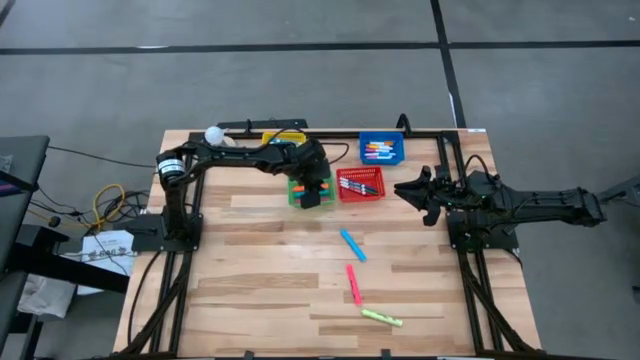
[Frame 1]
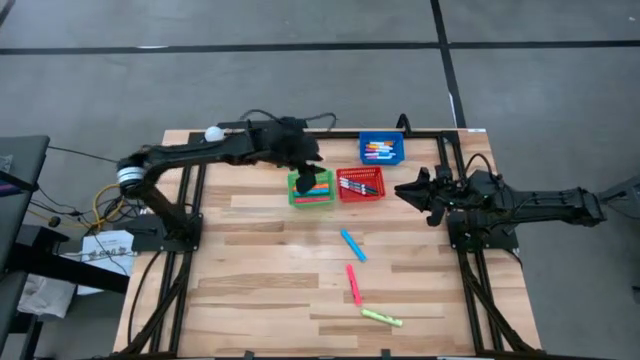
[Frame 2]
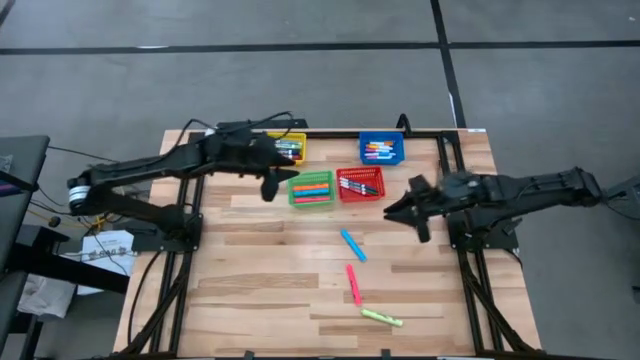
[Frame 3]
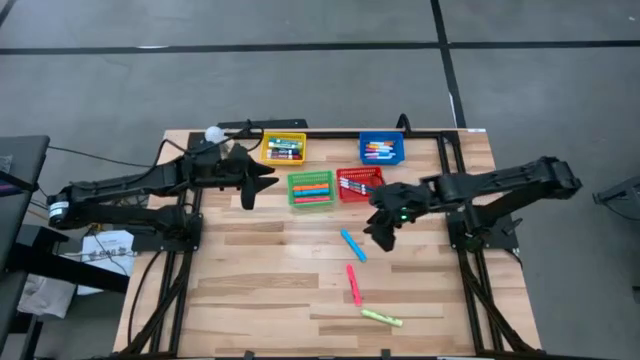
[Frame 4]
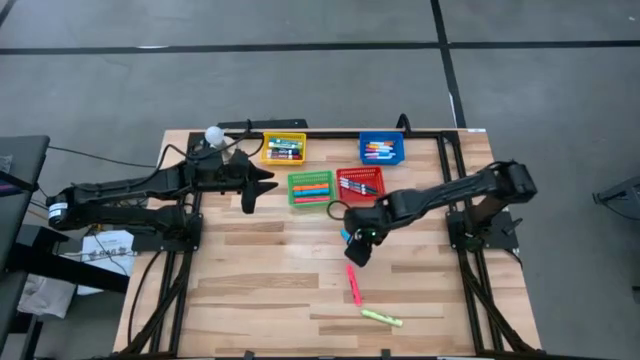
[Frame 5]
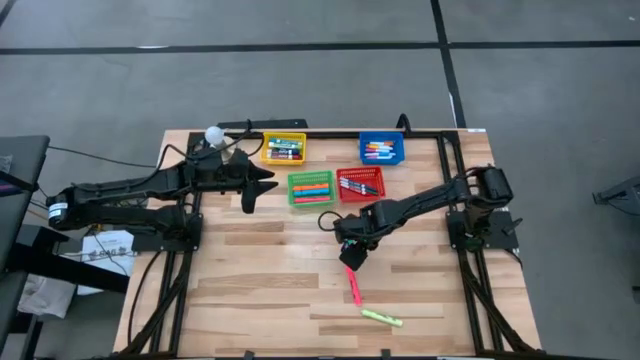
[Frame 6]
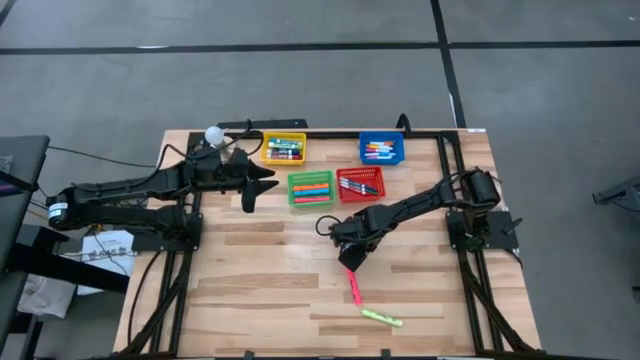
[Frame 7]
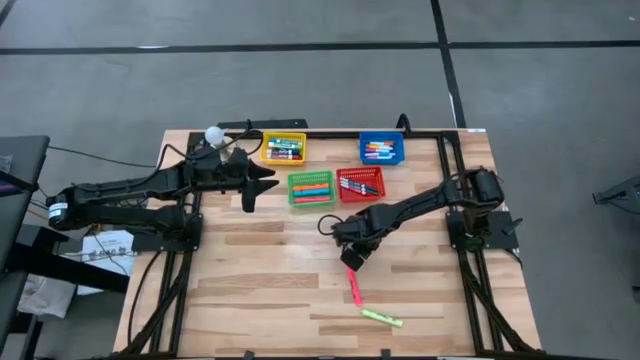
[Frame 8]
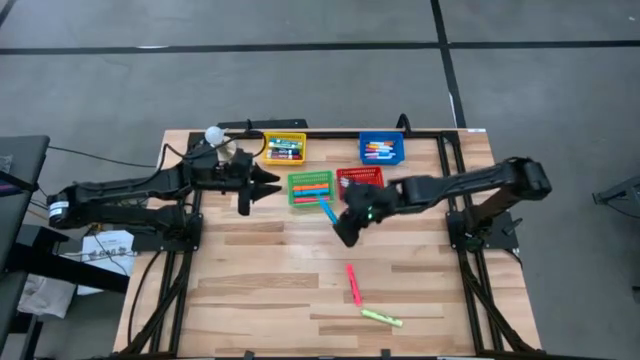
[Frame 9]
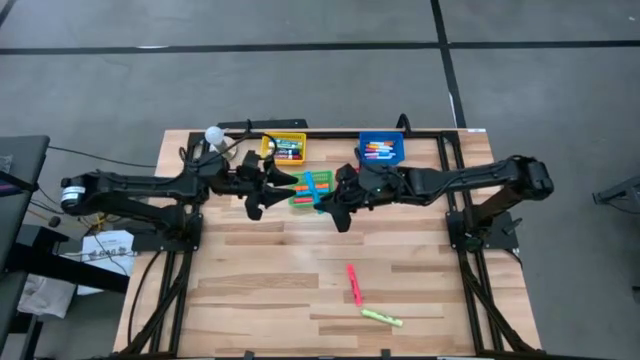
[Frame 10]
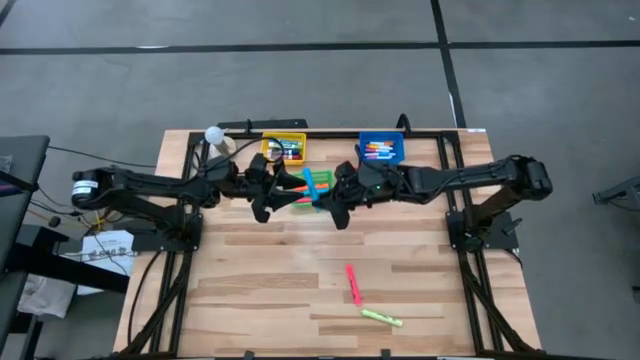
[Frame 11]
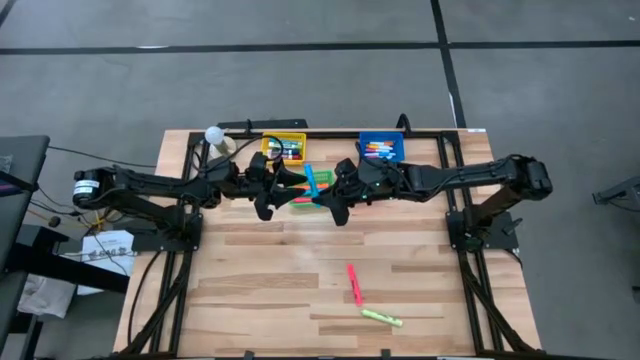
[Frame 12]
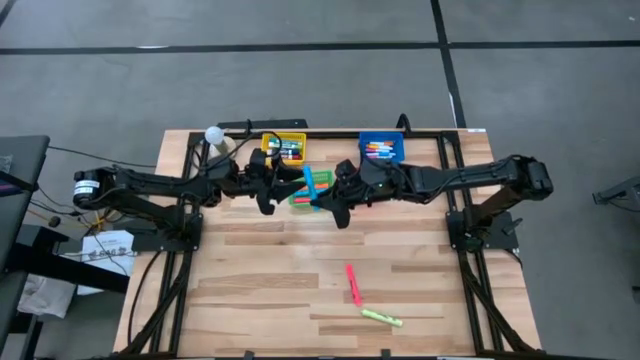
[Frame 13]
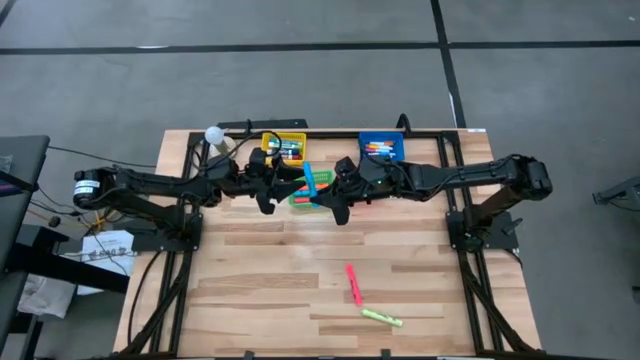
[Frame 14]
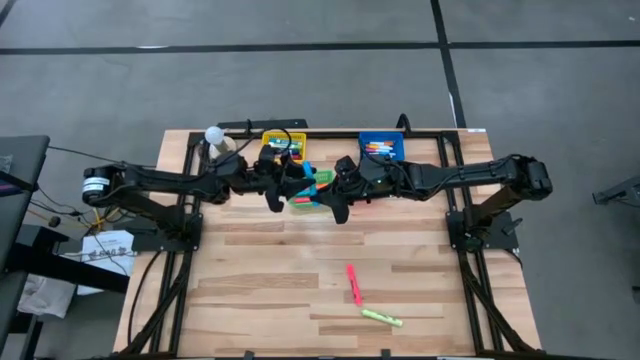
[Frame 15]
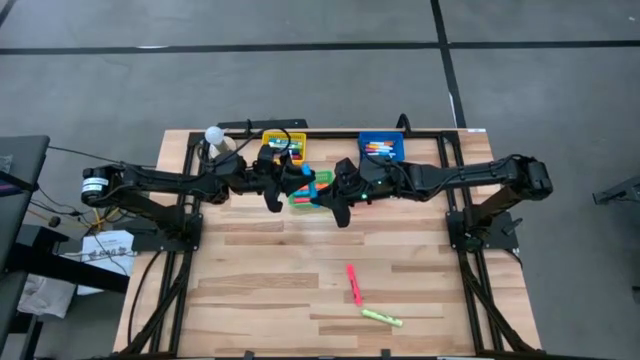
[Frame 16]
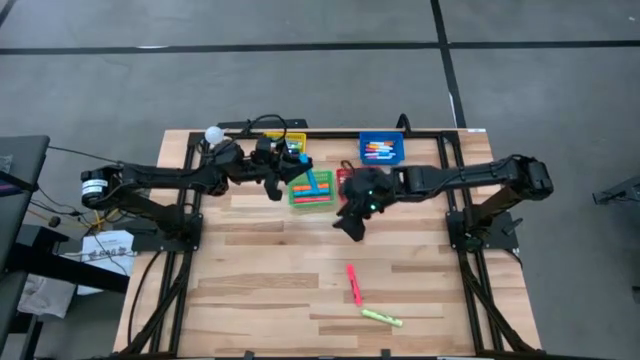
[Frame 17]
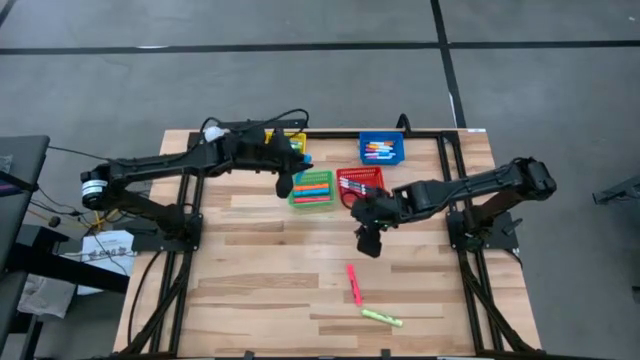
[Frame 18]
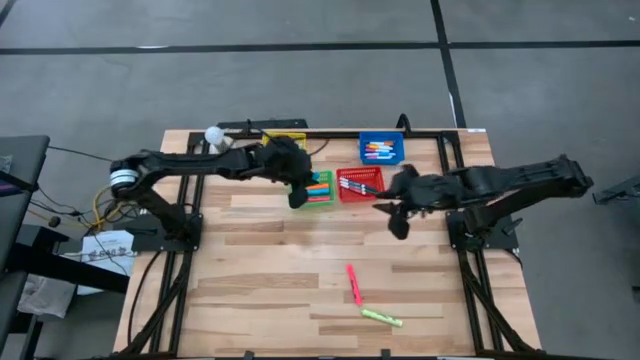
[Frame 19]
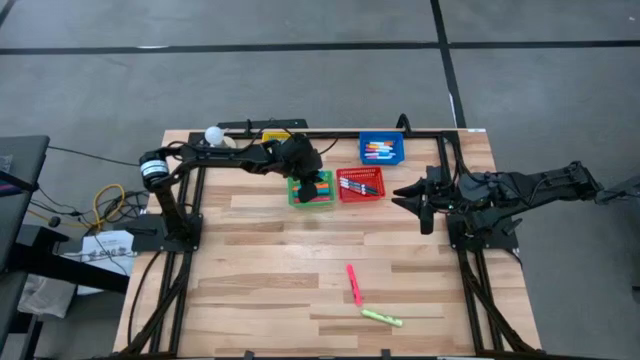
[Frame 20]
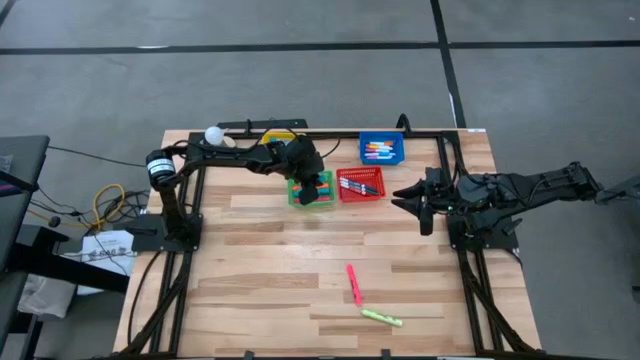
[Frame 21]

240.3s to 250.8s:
Task: Pick & Place Markers
Put the large blue highlighter pen into the green bin

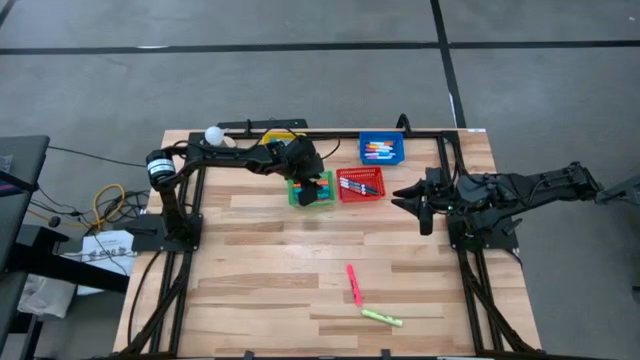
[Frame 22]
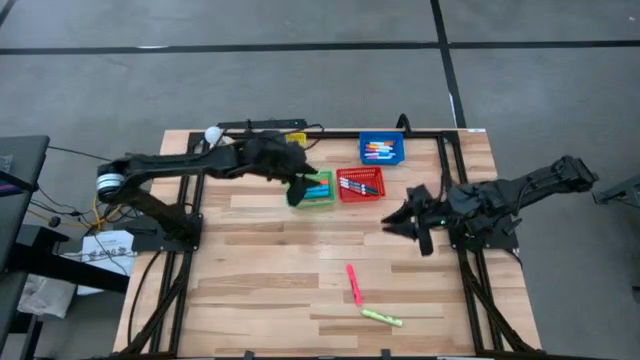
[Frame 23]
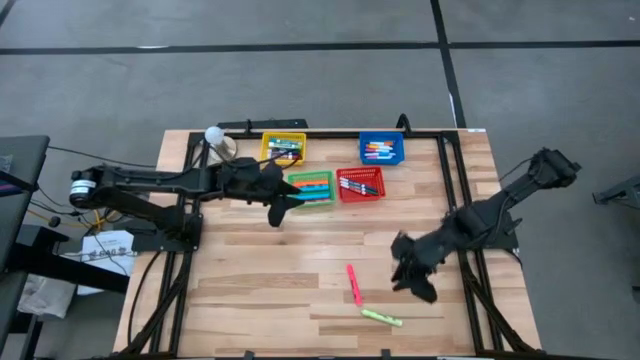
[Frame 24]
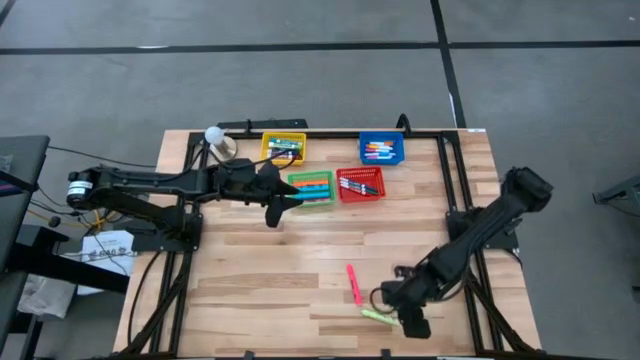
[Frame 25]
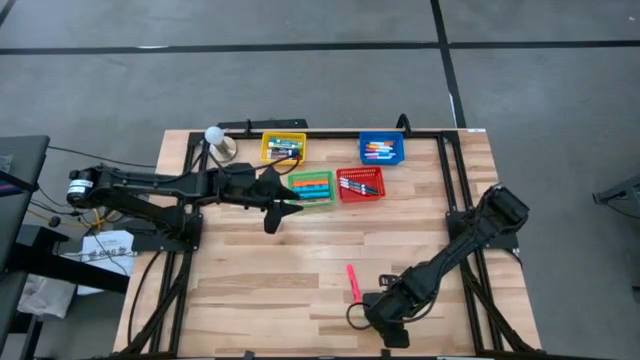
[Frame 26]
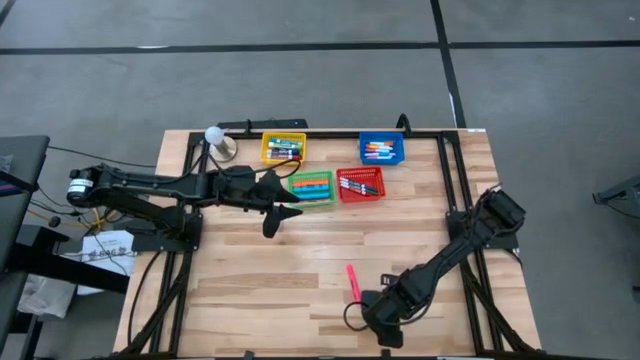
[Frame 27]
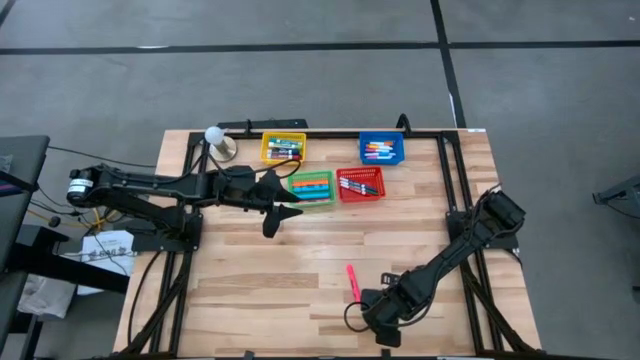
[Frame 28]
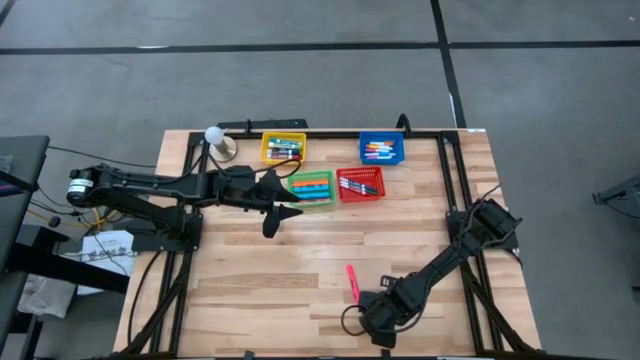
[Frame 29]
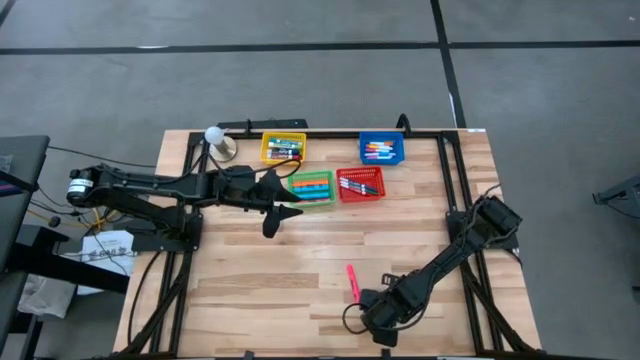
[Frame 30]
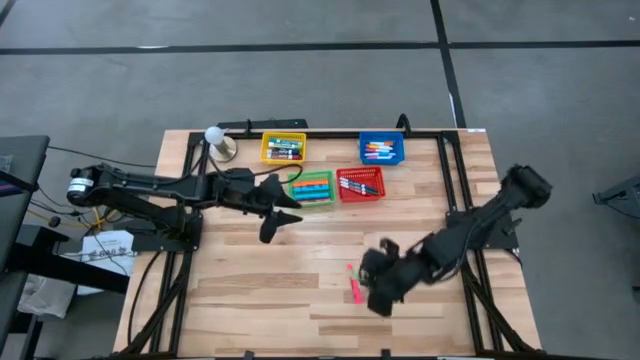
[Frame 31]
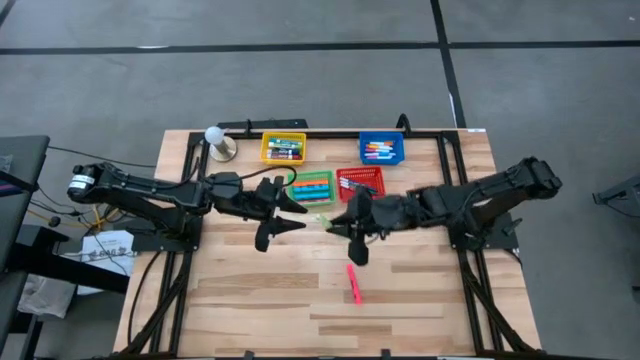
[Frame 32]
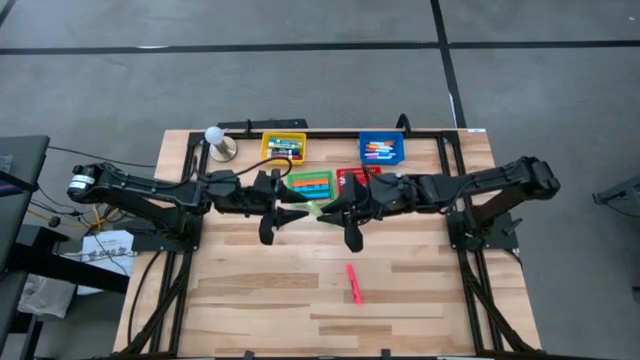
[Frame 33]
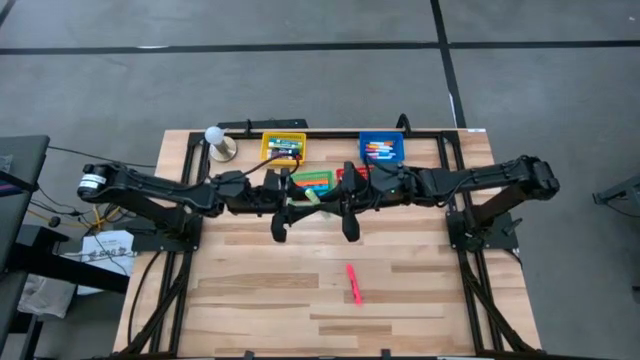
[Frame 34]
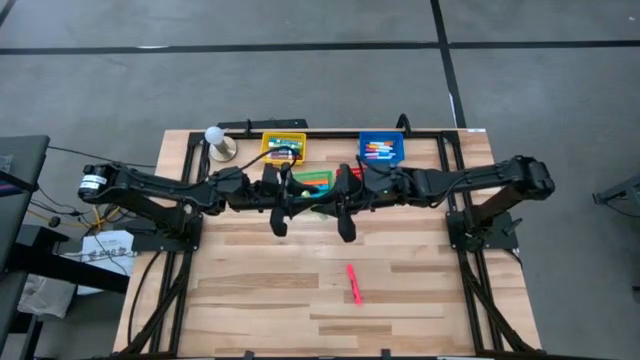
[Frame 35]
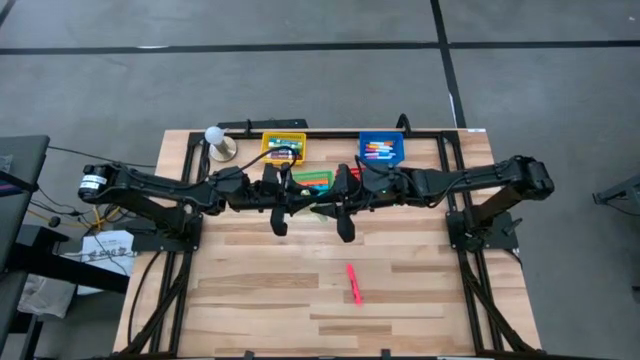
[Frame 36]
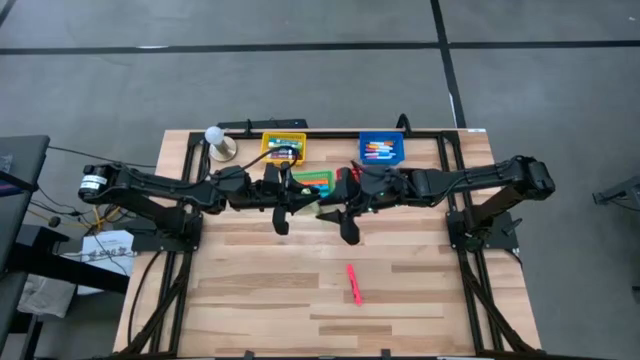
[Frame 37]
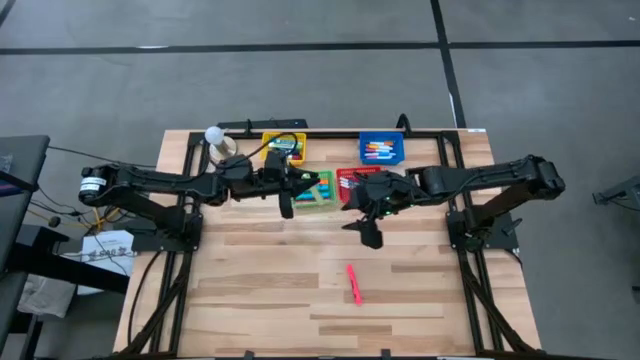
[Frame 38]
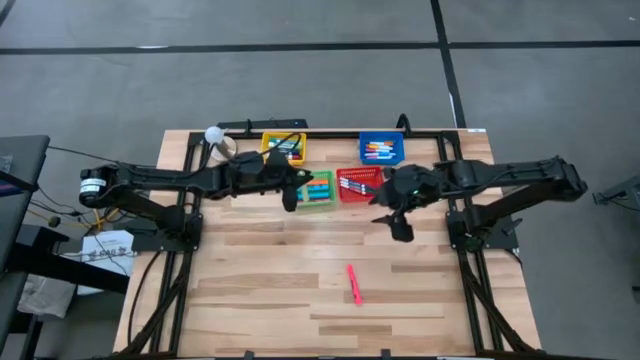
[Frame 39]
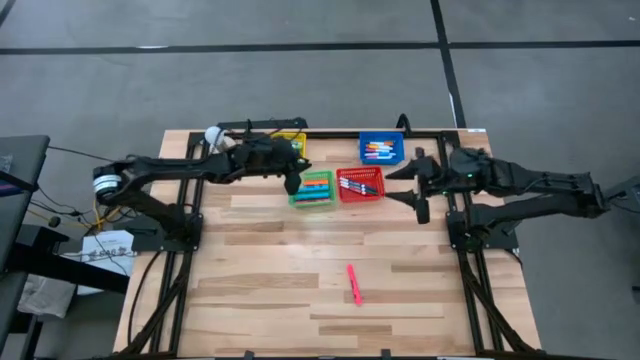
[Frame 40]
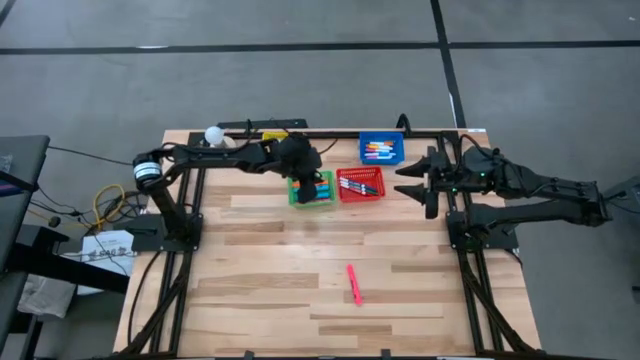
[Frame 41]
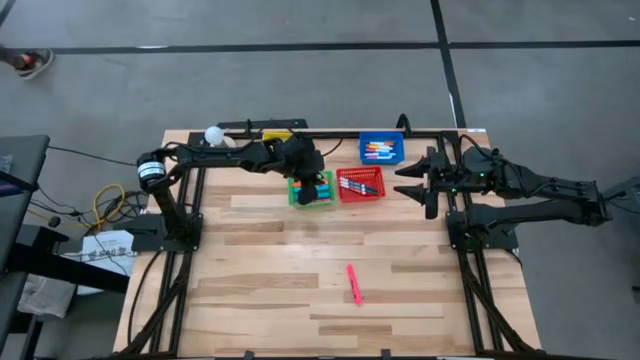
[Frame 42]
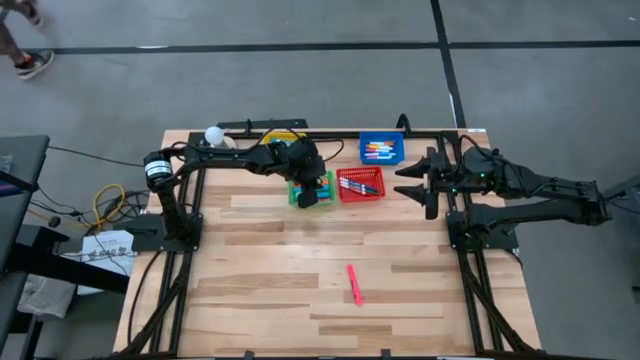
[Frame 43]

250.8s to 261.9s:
Put the light green highlighter pen into the green bin
